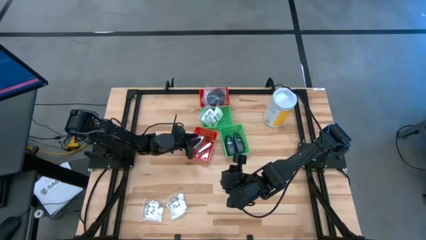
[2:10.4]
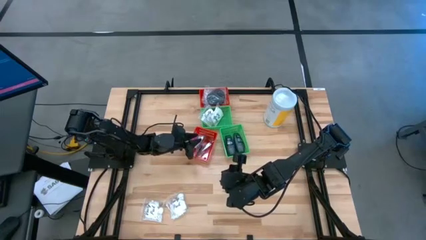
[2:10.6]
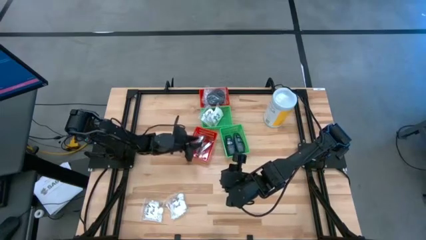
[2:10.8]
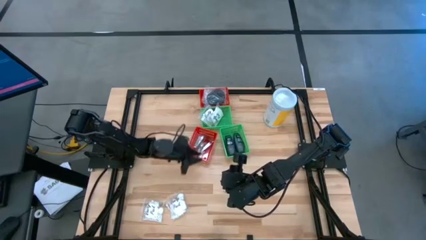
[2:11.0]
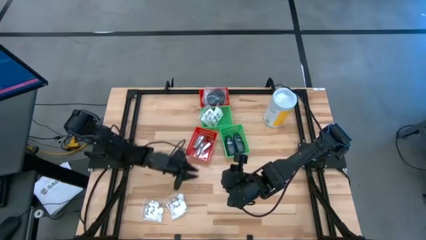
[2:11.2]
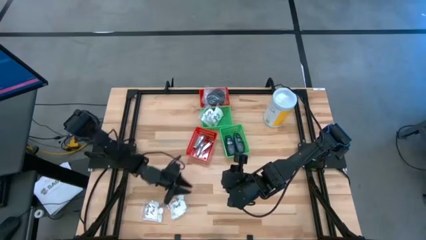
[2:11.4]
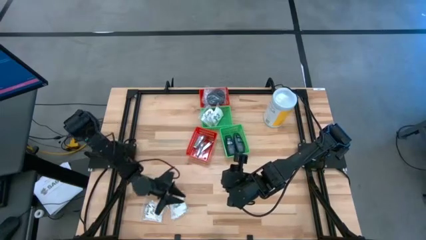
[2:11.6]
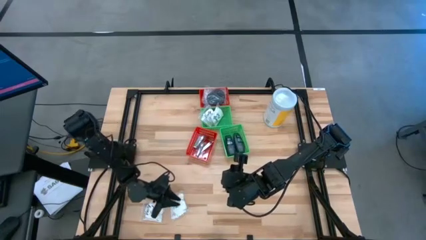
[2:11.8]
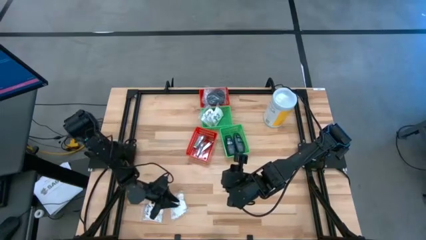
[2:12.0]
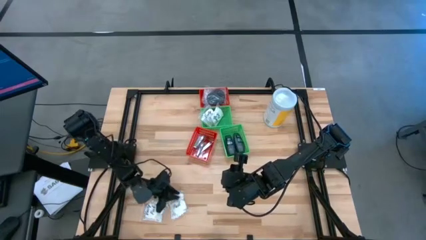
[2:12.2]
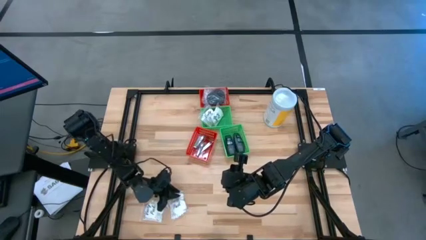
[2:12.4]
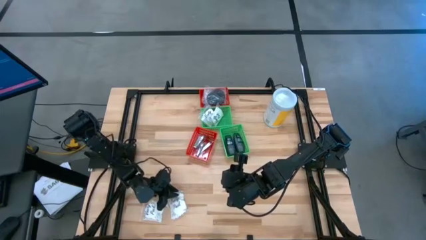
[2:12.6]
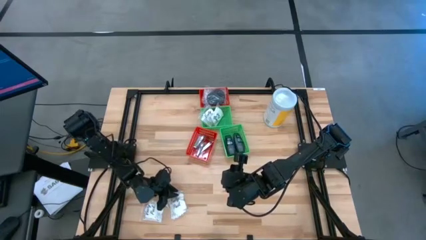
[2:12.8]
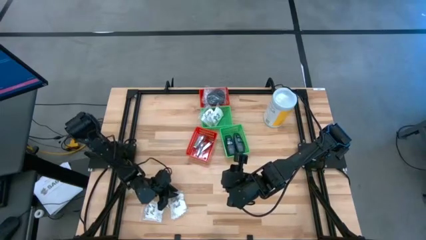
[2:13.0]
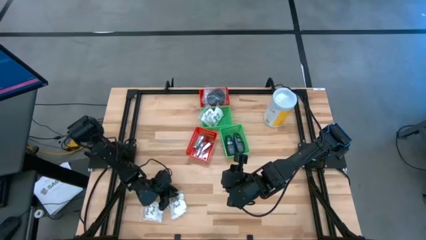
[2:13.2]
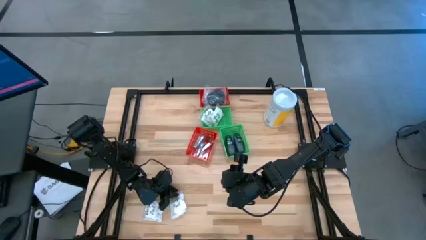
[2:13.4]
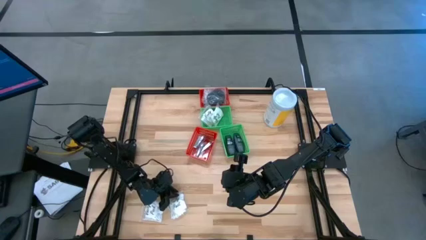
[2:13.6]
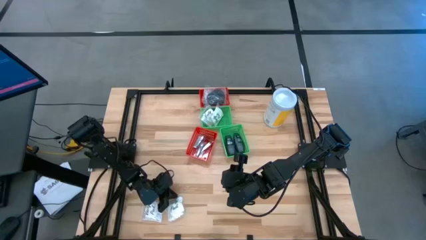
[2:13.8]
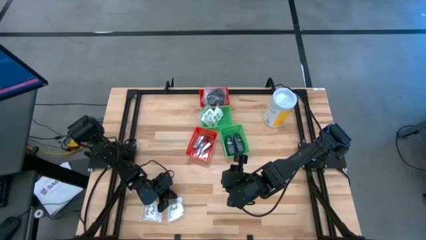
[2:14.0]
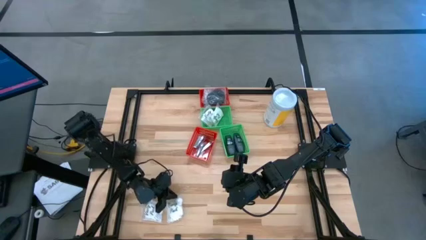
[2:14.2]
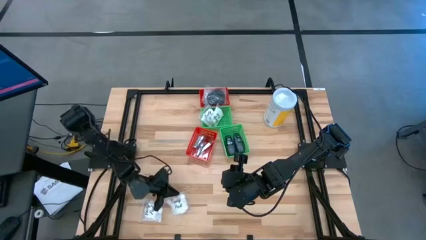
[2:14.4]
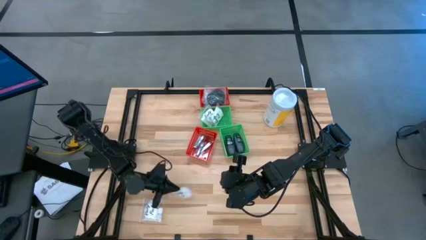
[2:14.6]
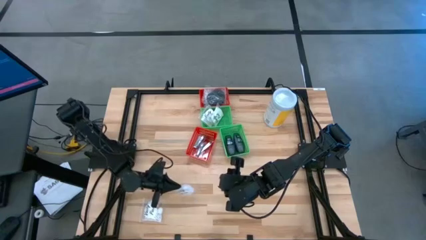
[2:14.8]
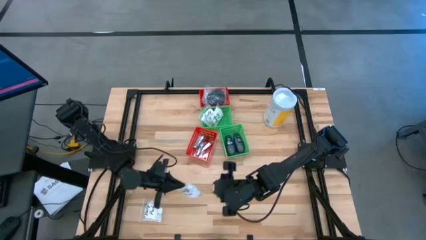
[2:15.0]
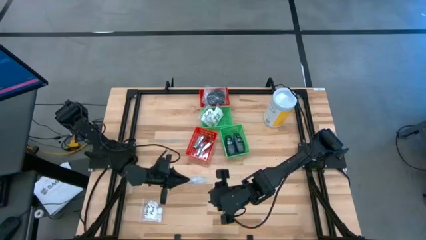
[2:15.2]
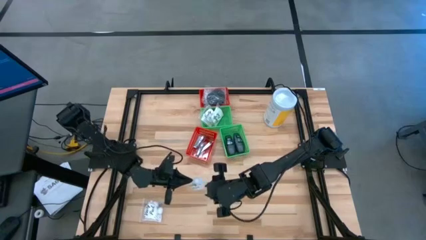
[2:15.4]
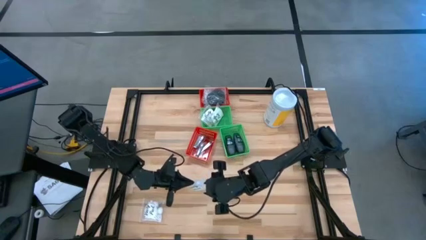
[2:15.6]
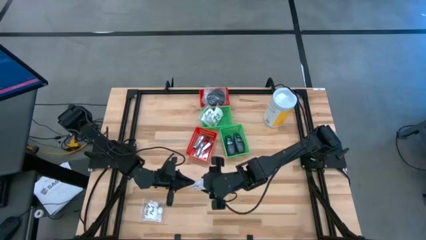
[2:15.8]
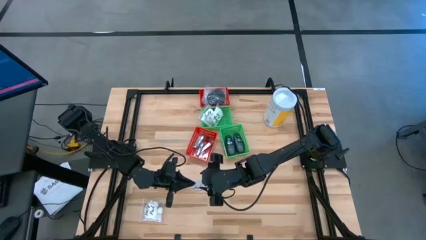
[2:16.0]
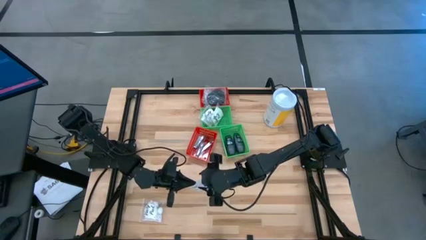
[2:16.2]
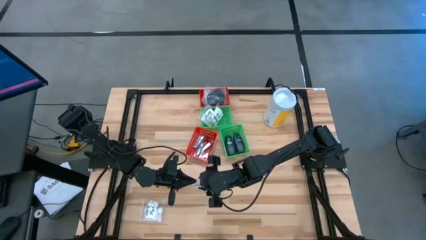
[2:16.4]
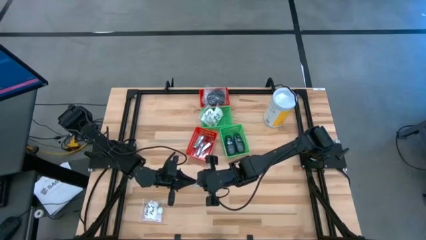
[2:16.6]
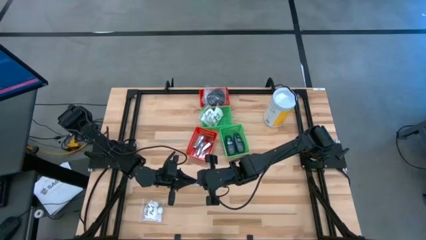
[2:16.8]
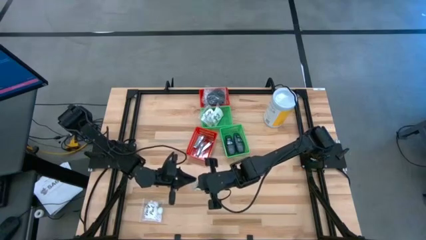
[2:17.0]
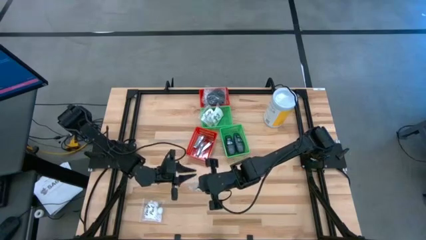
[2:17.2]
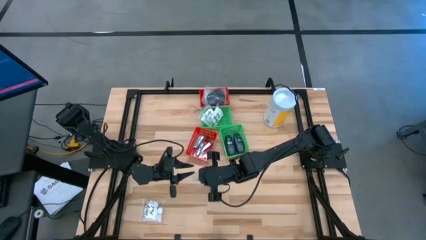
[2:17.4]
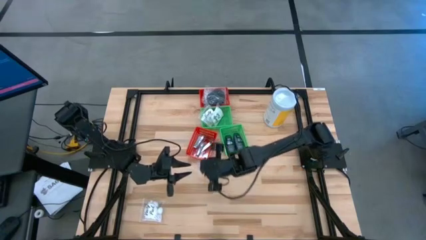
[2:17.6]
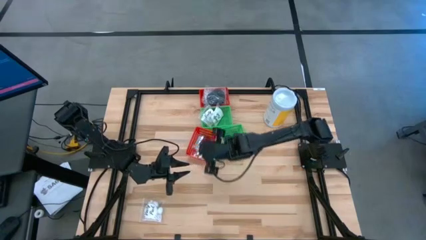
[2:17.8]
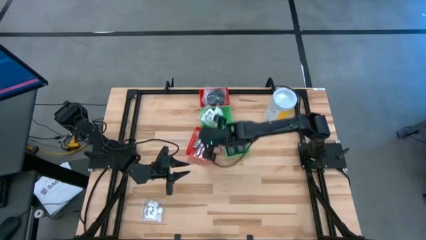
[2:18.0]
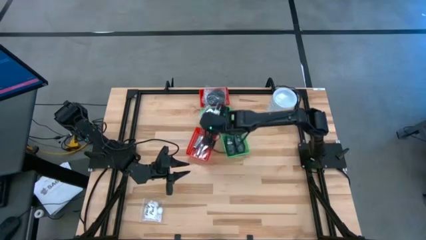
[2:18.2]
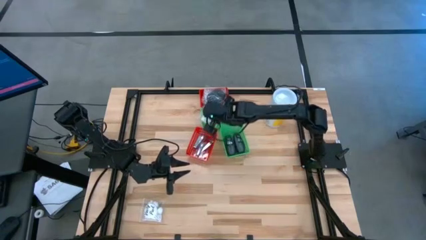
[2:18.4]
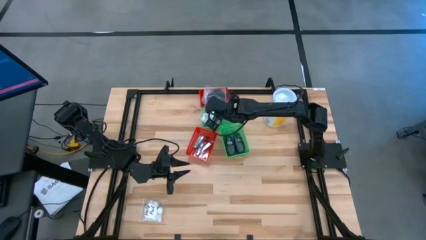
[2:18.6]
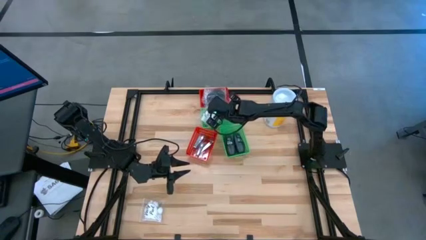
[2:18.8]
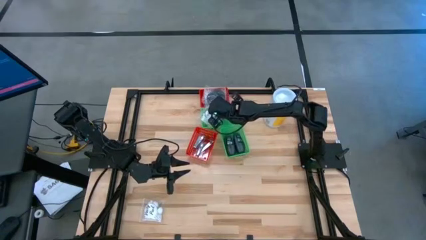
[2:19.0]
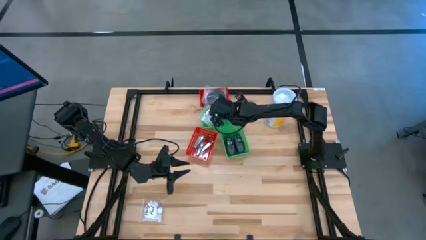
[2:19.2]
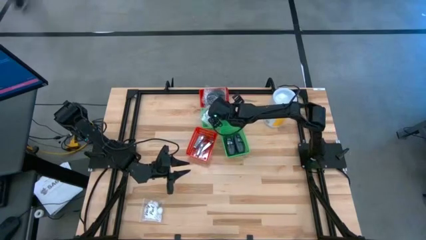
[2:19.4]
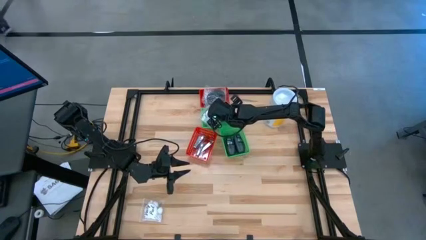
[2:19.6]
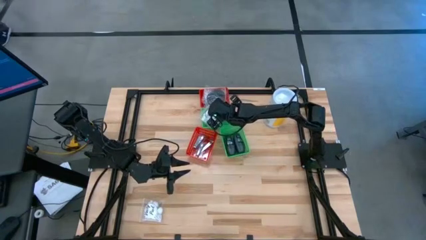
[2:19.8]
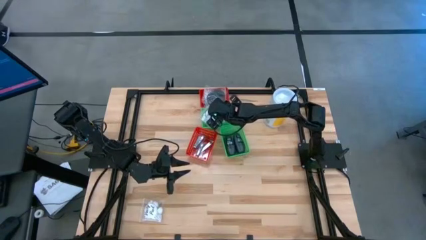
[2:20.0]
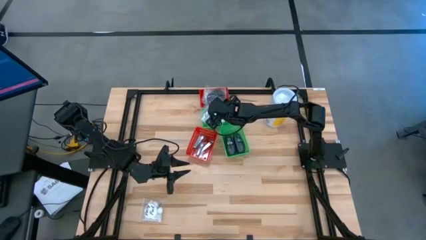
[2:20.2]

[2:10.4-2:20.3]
Task: Pick & Place Travel size toiletries
Put the white cotton pack into the top green bin

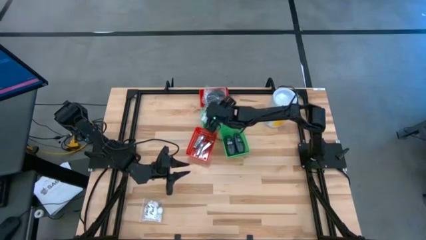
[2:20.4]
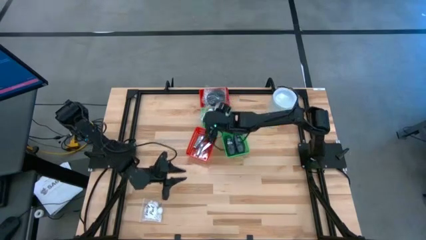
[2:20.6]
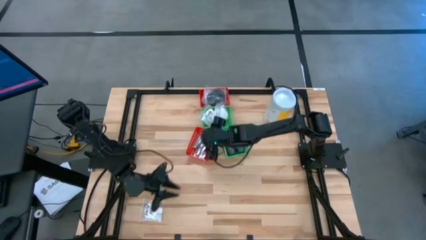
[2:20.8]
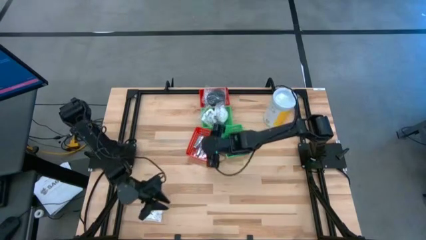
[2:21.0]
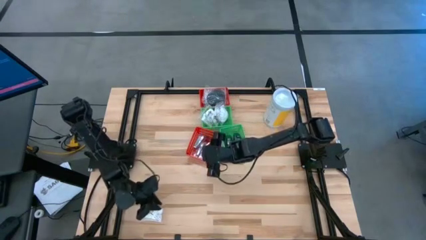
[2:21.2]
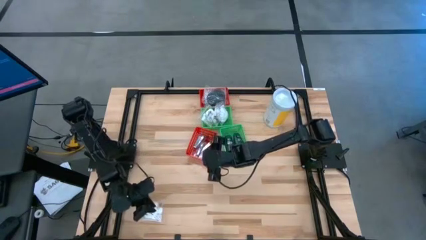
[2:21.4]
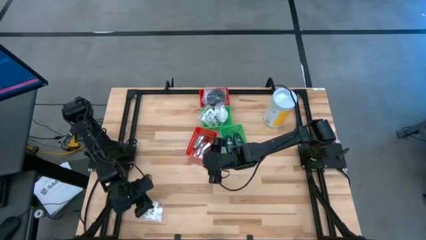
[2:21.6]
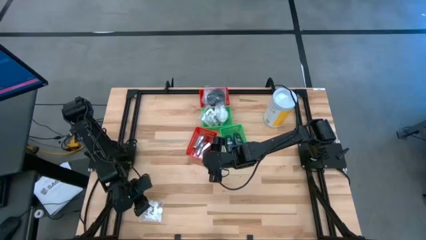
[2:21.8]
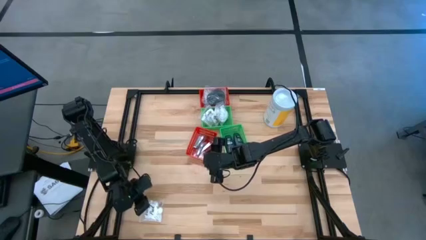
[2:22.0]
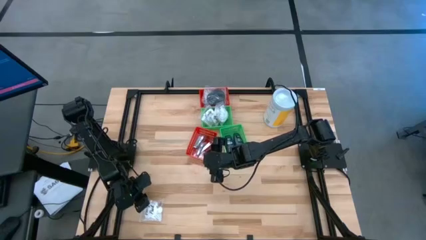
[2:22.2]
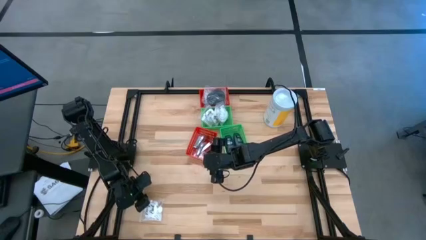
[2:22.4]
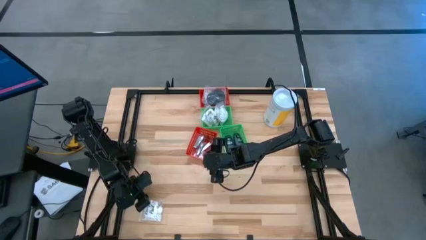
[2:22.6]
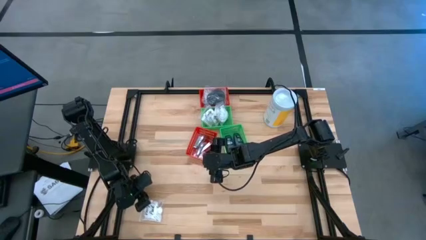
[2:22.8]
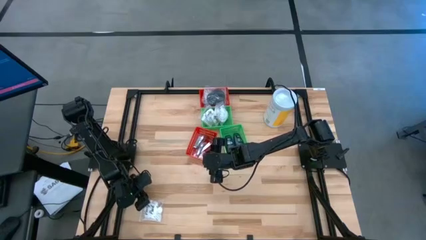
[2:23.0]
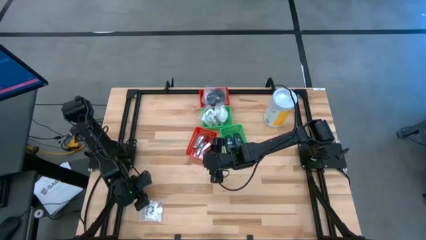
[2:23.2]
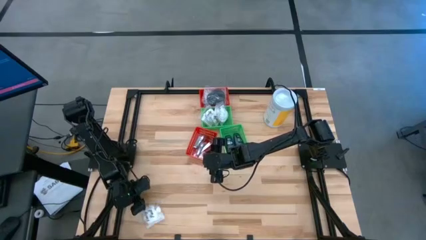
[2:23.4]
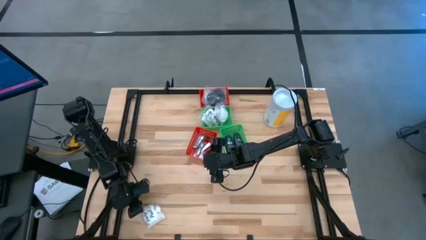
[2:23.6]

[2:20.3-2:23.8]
Put the white cotton pack into the top green bin
